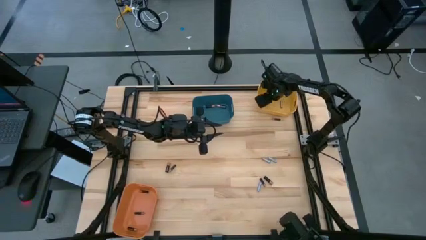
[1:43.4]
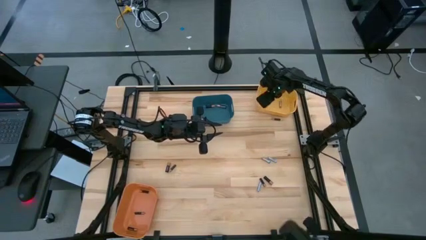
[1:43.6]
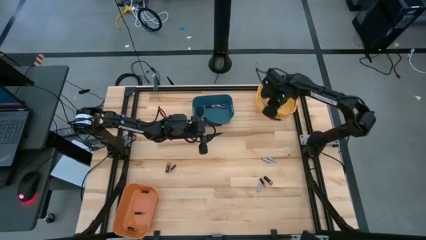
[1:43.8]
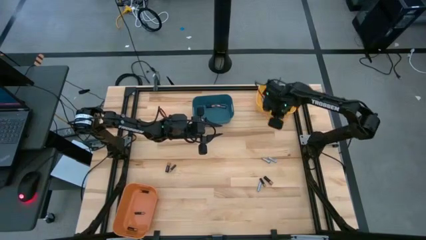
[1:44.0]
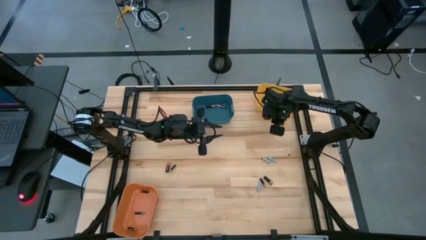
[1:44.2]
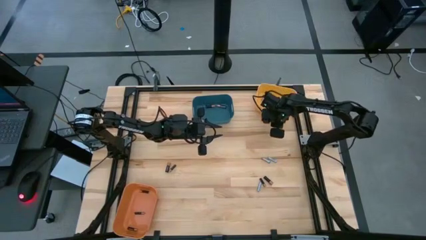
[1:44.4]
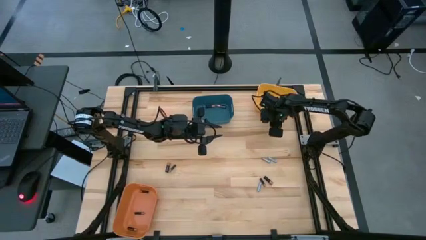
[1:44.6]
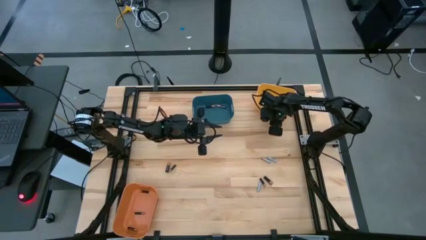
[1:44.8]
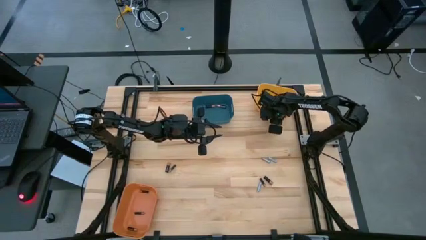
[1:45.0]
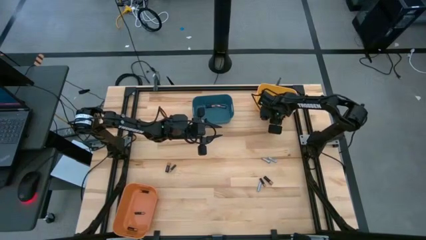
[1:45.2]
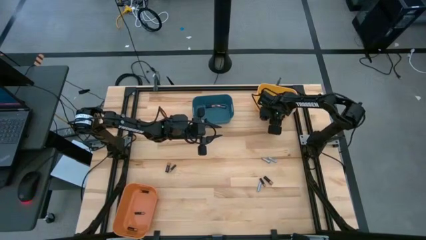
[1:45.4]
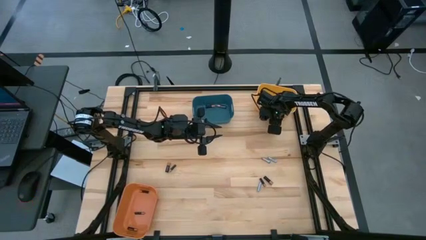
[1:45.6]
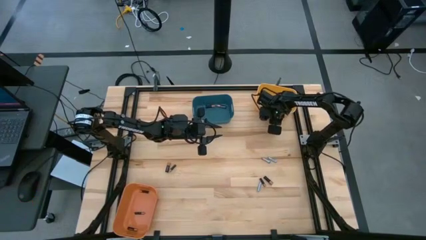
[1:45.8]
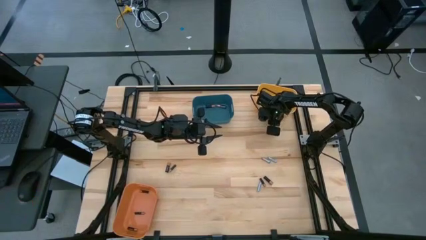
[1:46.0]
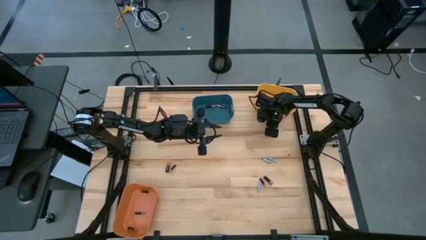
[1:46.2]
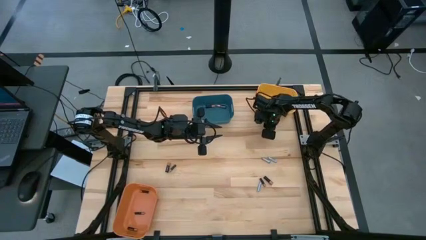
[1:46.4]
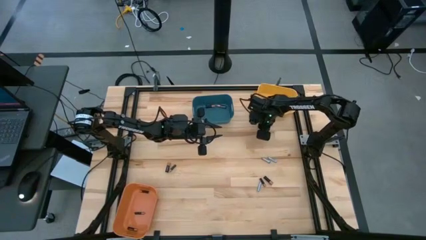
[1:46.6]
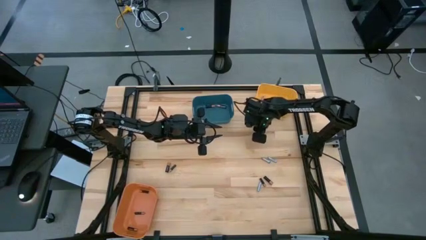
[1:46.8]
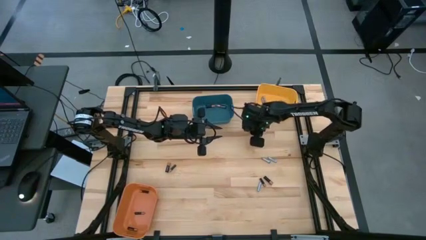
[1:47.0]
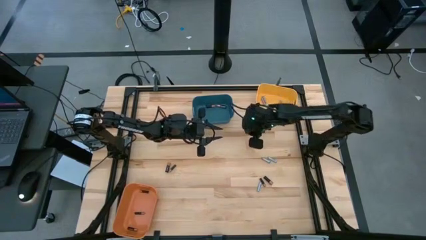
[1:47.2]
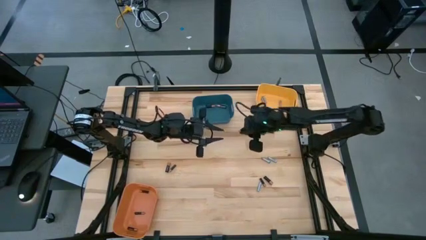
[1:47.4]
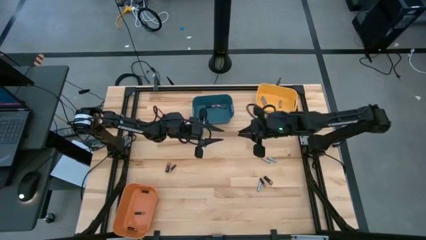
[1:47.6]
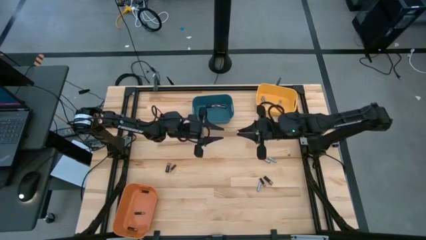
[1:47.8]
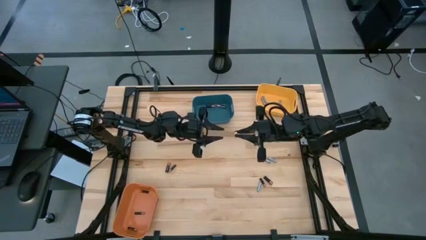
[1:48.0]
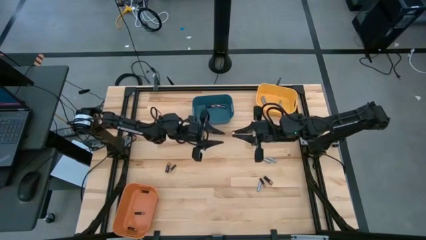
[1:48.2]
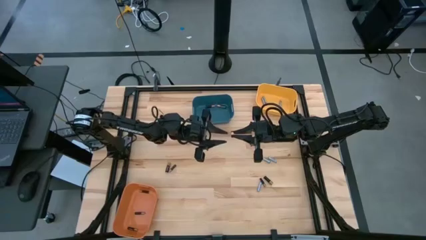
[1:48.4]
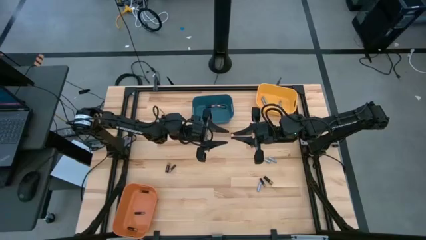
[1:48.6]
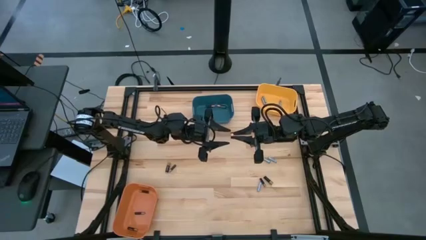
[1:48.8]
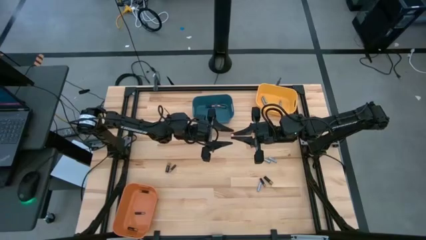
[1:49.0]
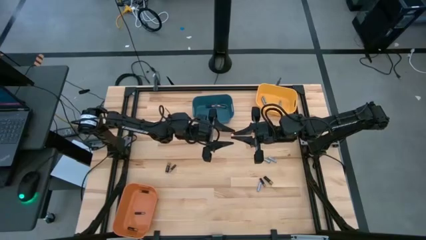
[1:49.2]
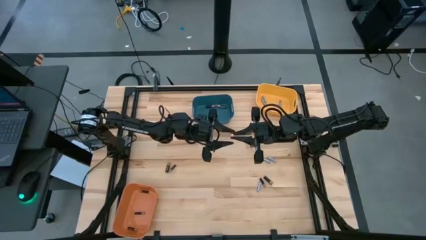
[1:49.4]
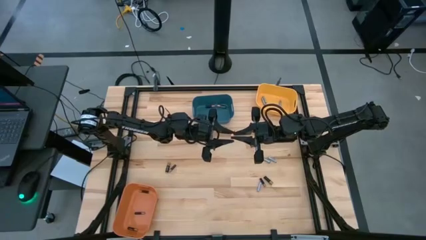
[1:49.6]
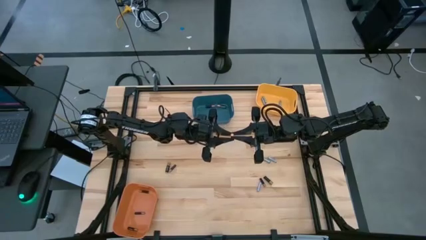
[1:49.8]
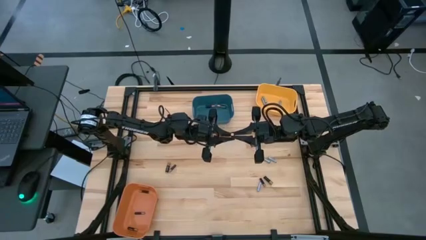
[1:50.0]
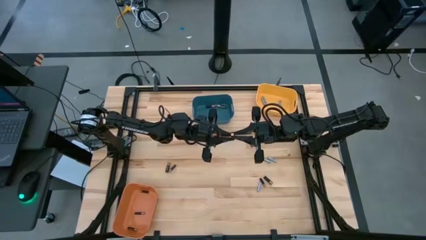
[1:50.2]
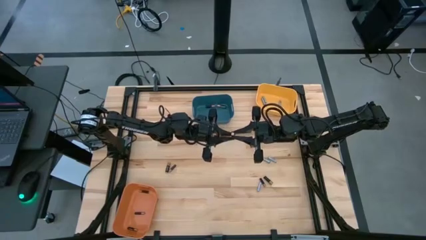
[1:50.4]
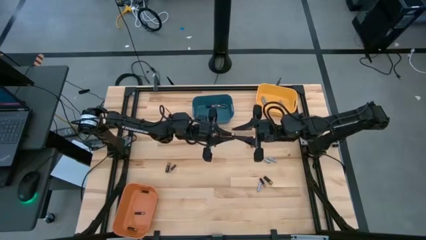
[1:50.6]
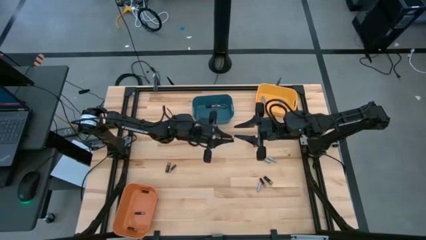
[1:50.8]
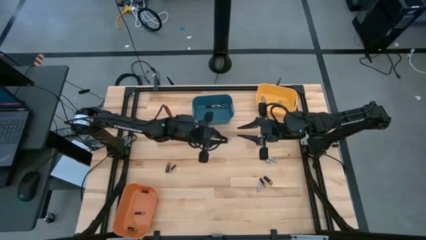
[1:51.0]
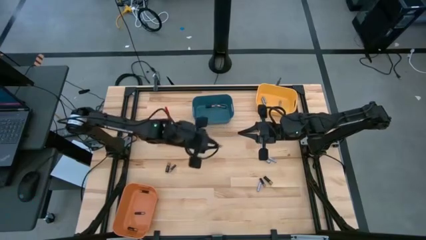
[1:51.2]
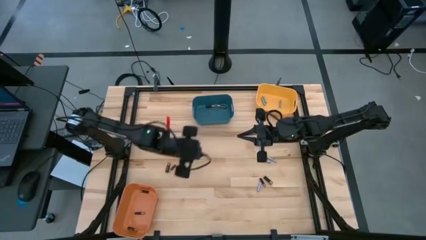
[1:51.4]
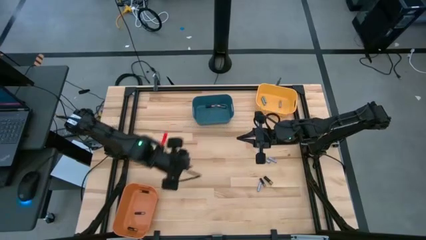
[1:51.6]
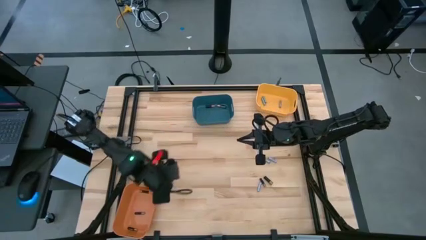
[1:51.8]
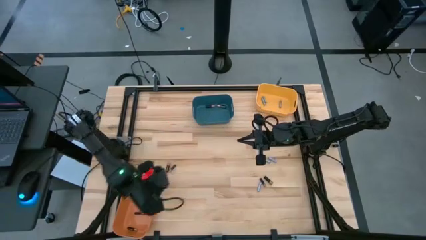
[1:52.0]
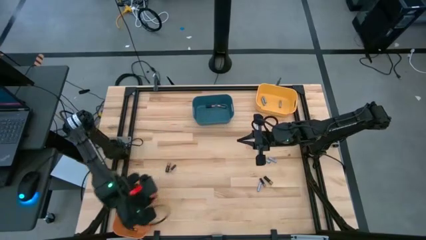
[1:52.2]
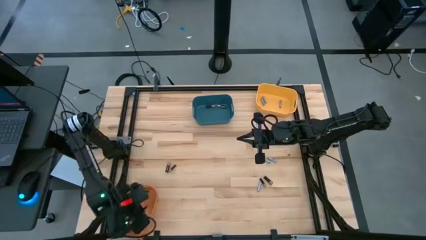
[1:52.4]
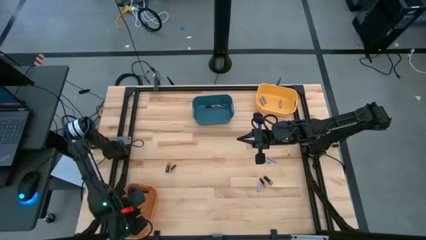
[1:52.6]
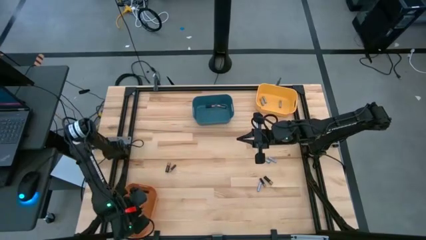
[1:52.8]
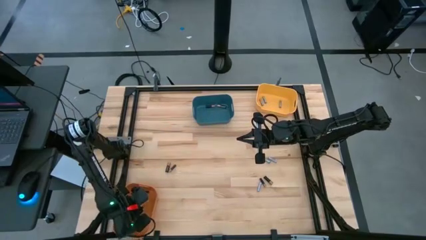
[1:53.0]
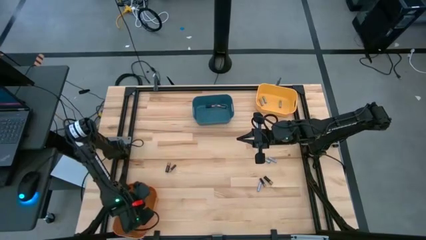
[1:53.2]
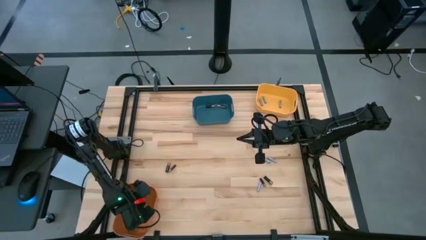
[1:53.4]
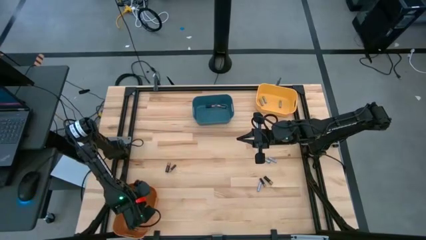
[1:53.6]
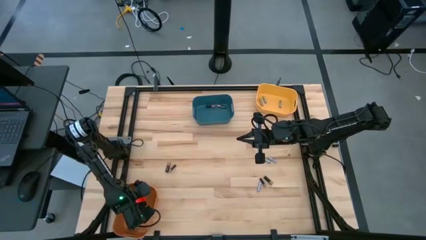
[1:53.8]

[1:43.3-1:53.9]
Task: Sort batteries
Put the small black battery into the orange bin

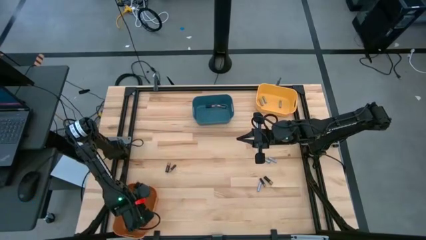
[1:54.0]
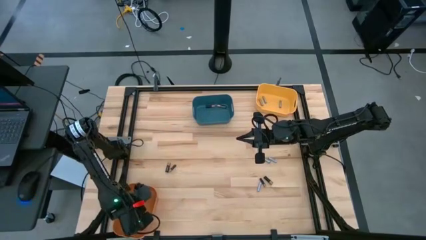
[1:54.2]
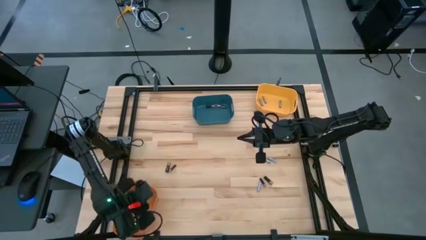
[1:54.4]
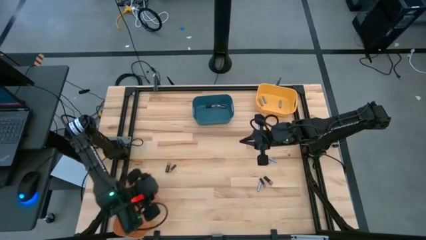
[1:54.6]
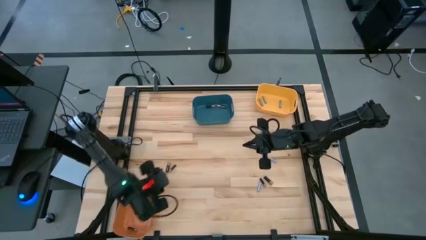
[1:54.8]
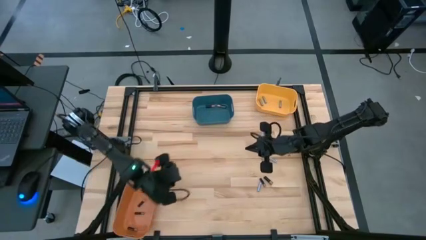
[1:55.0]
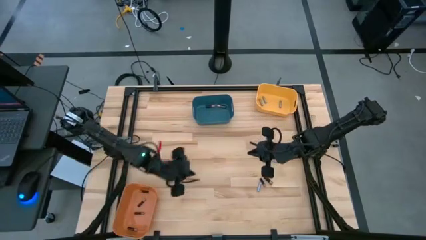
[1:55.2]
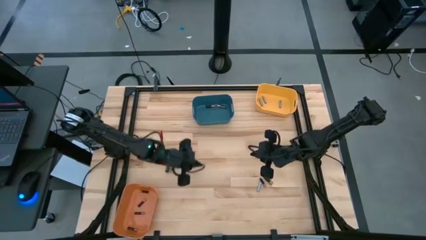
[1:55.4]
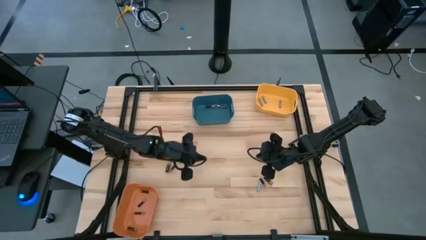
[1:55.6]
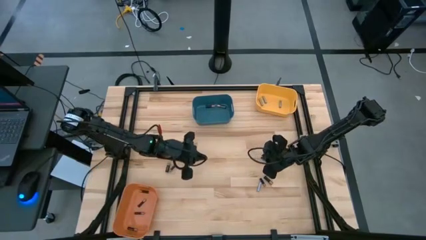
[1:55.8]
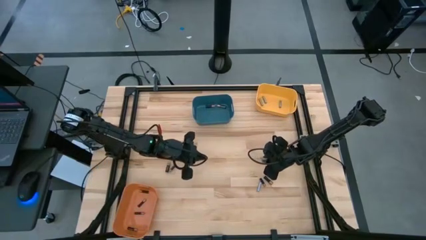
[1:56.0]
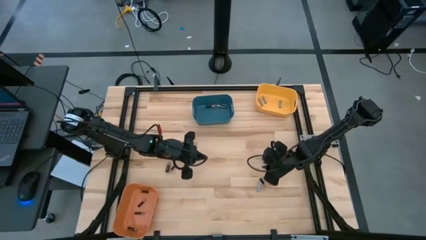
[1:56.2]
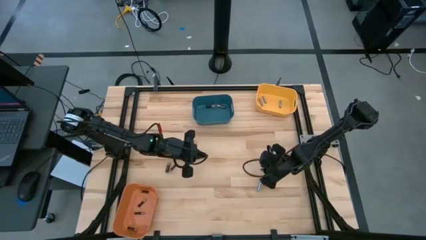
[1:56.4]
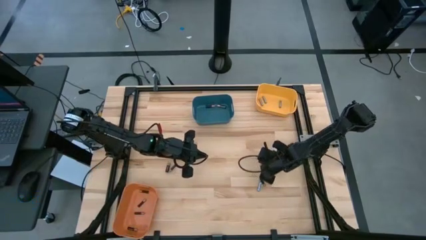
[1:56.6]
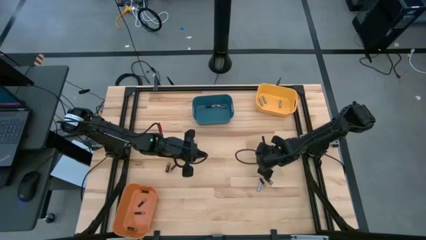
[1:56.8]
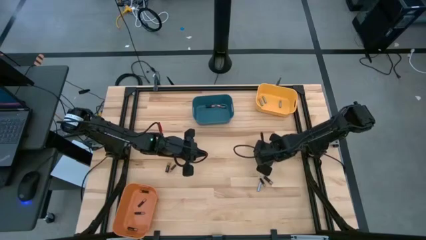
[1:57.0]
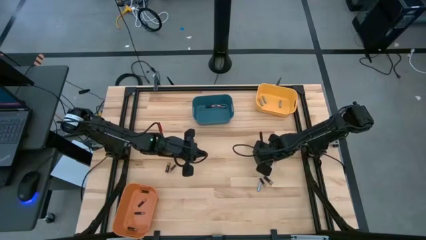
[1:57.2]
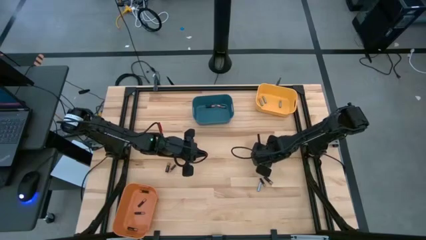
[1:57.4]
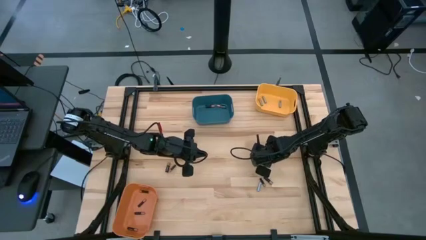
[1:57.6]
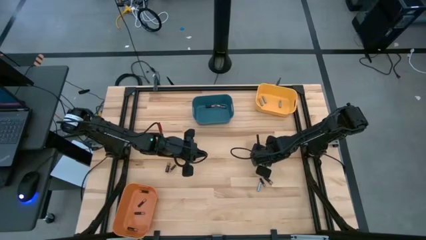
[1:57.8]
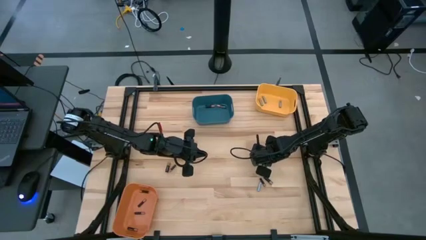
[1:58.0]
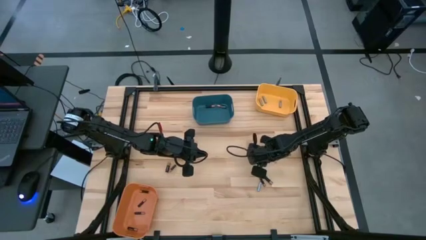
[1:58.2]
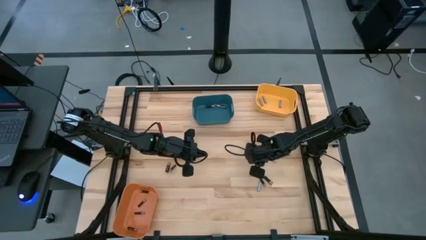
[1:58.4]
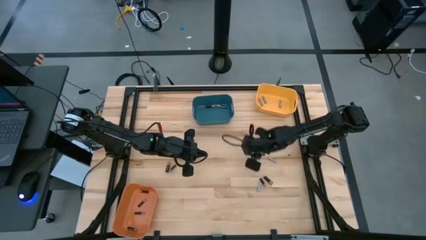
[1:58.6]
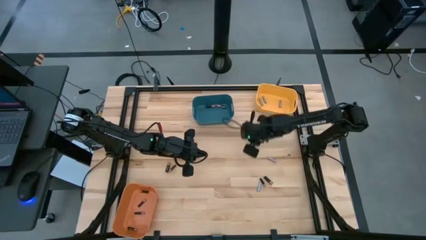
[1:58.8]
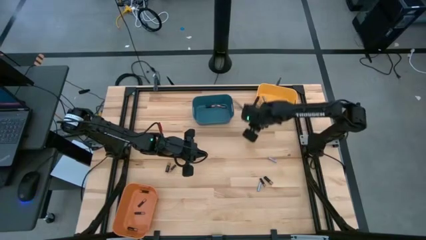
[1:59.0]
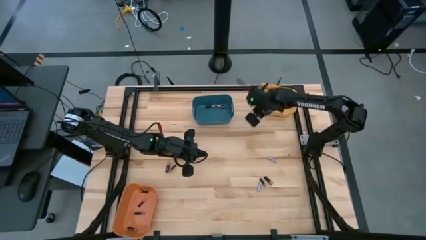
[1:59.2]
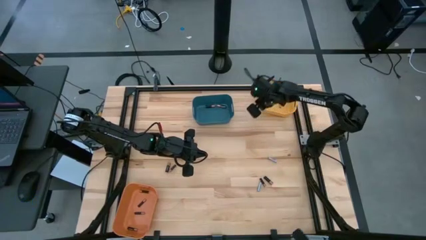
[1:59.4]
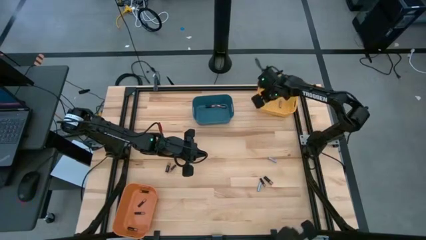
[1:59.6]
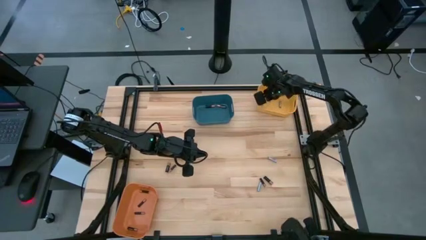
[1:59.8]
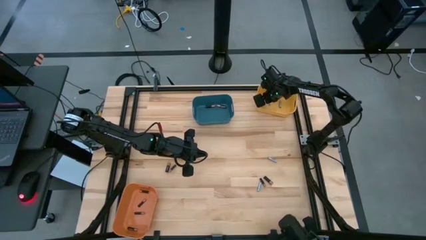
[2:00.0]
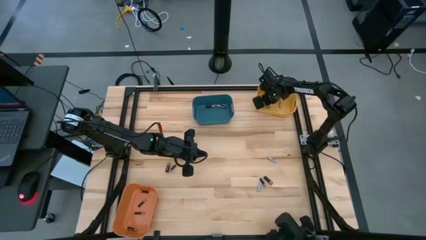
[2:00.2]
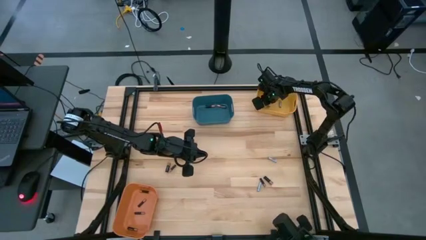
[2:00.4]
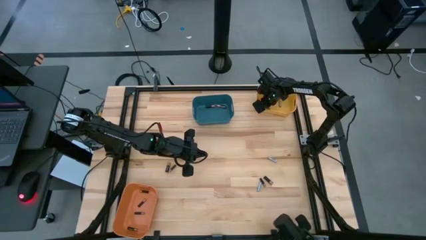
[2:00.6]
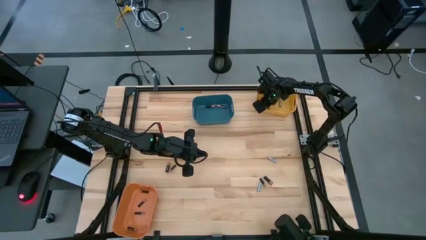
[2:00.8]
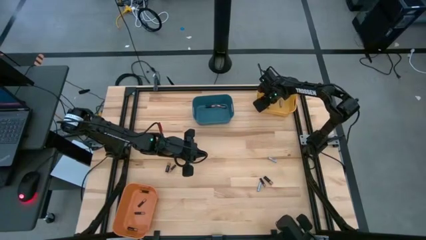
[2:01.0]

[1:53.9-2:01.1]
Put the white battery into the yellow bin
